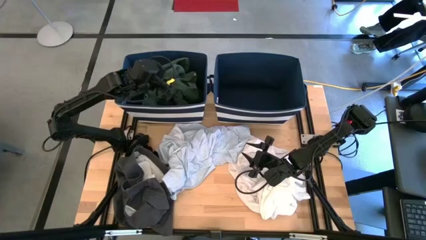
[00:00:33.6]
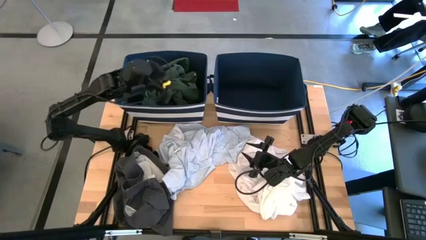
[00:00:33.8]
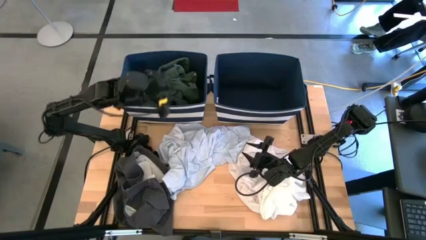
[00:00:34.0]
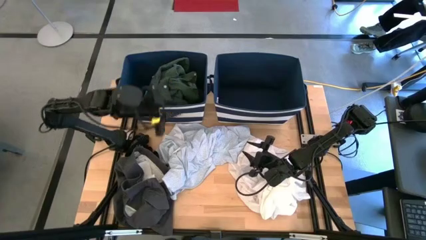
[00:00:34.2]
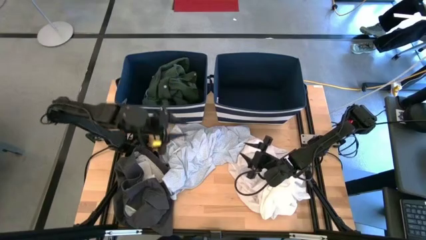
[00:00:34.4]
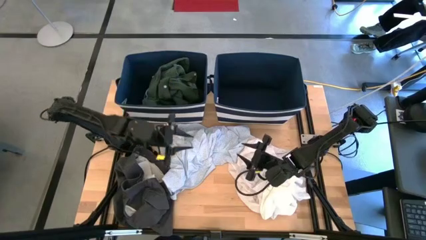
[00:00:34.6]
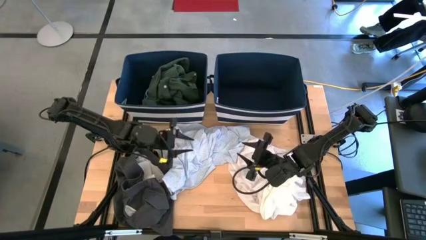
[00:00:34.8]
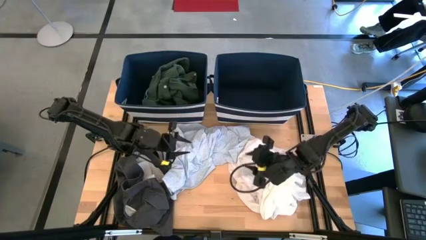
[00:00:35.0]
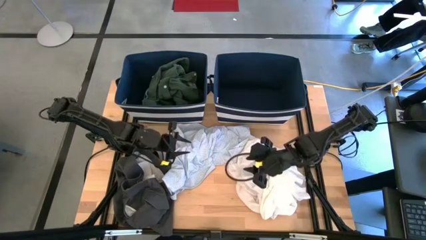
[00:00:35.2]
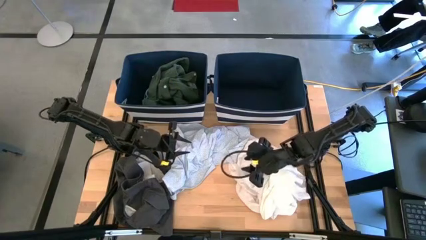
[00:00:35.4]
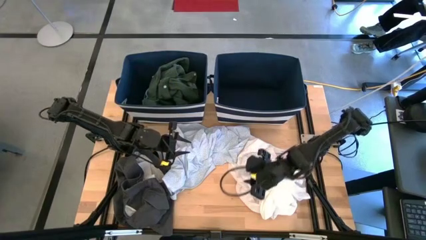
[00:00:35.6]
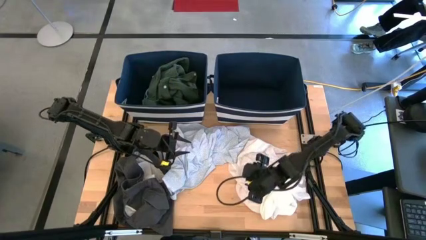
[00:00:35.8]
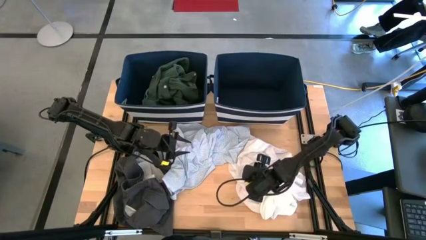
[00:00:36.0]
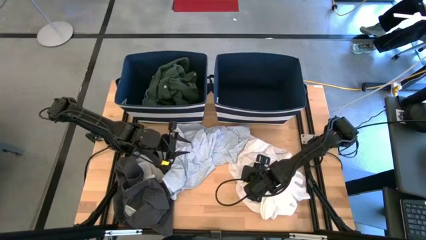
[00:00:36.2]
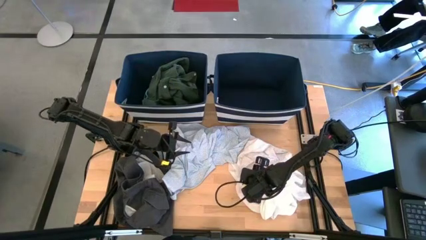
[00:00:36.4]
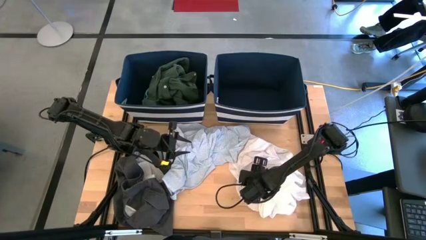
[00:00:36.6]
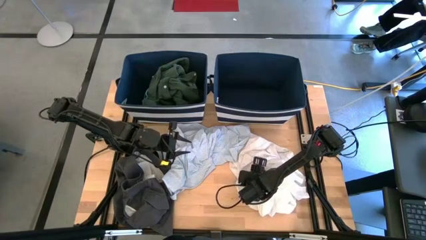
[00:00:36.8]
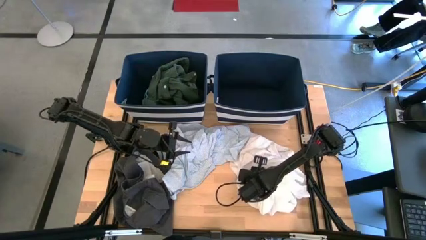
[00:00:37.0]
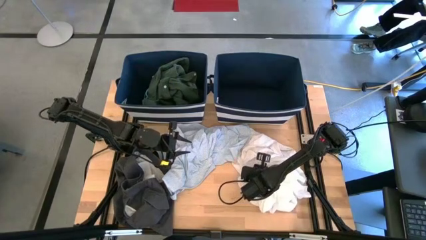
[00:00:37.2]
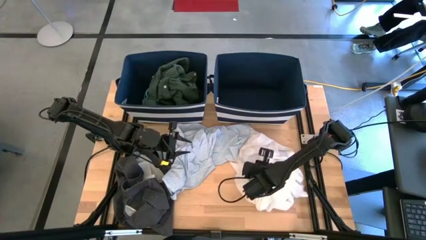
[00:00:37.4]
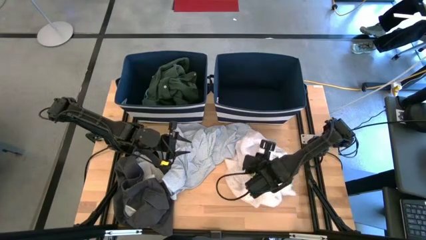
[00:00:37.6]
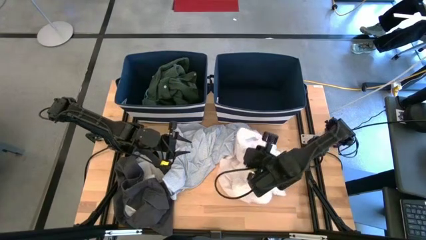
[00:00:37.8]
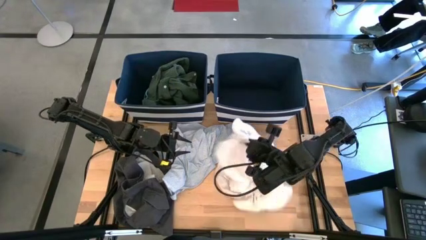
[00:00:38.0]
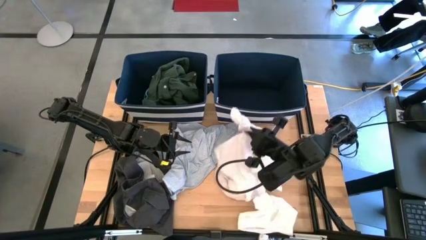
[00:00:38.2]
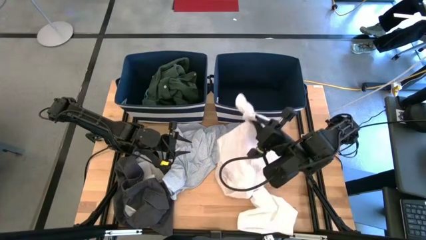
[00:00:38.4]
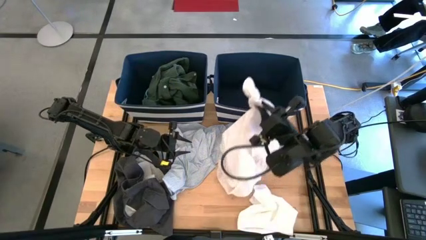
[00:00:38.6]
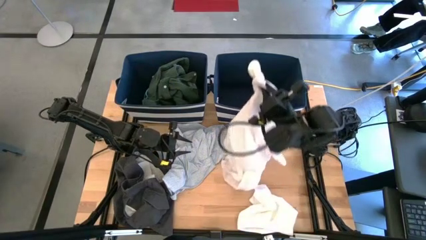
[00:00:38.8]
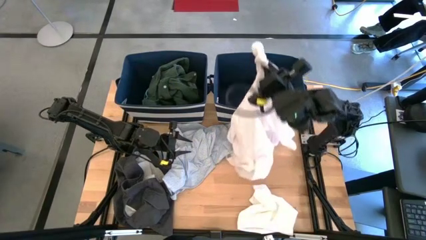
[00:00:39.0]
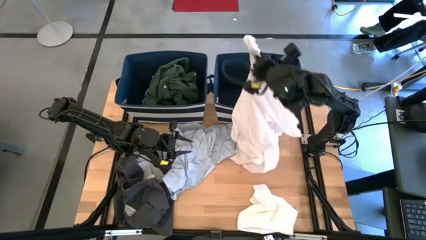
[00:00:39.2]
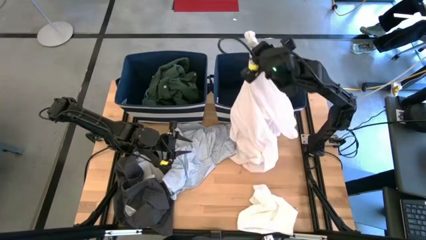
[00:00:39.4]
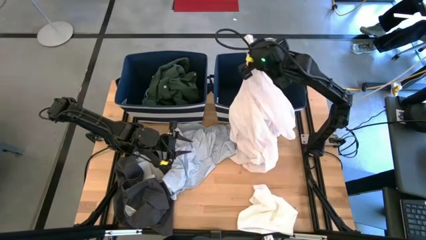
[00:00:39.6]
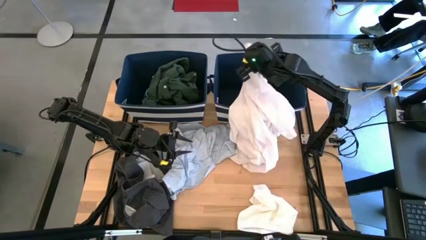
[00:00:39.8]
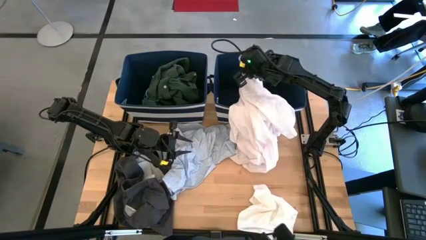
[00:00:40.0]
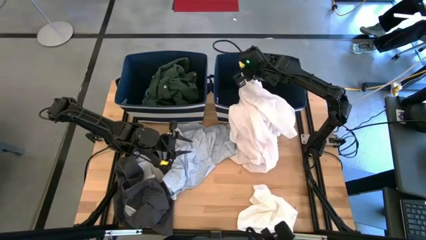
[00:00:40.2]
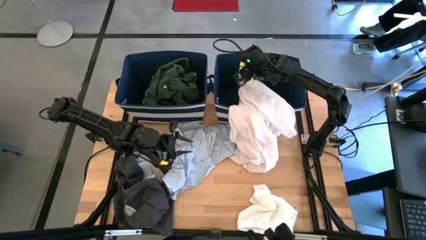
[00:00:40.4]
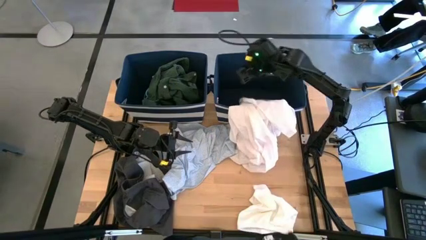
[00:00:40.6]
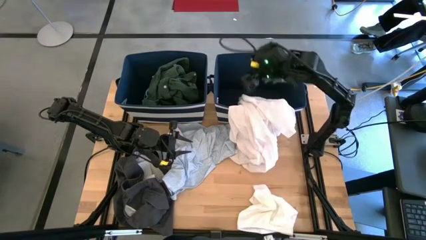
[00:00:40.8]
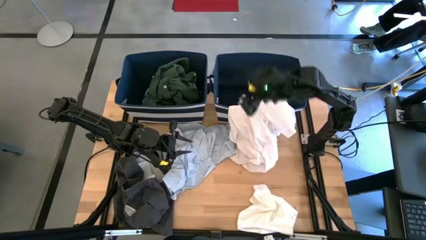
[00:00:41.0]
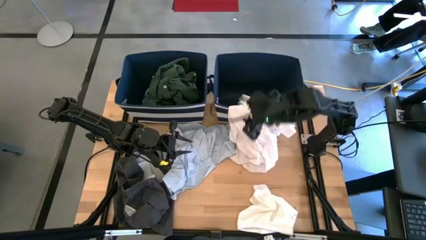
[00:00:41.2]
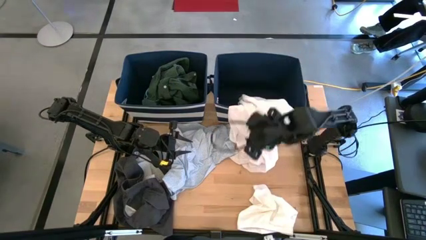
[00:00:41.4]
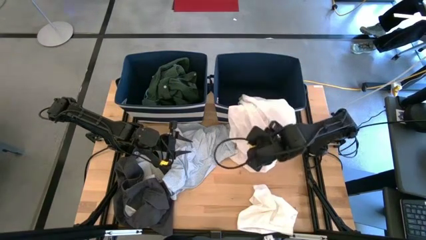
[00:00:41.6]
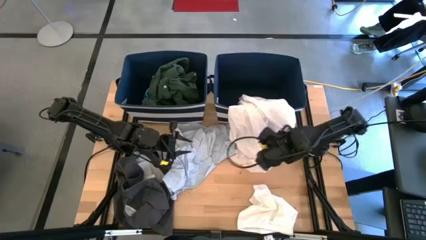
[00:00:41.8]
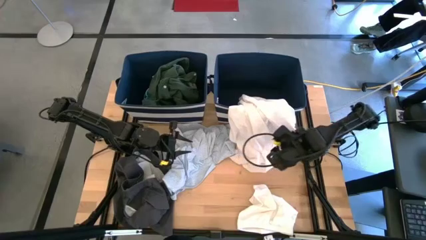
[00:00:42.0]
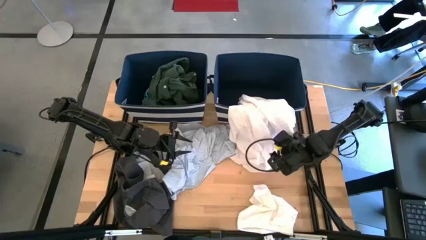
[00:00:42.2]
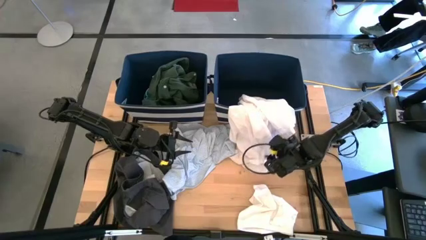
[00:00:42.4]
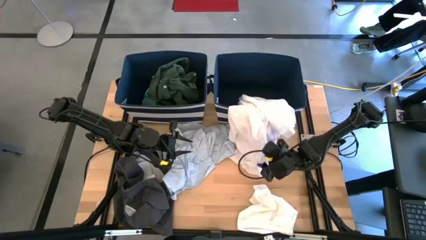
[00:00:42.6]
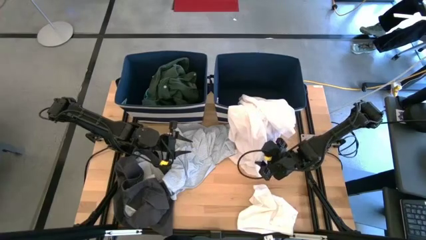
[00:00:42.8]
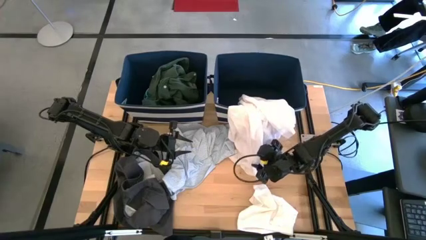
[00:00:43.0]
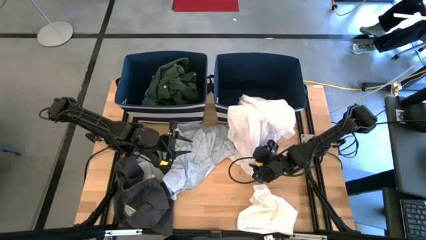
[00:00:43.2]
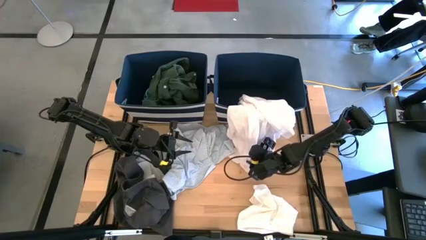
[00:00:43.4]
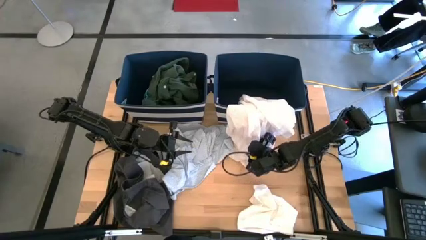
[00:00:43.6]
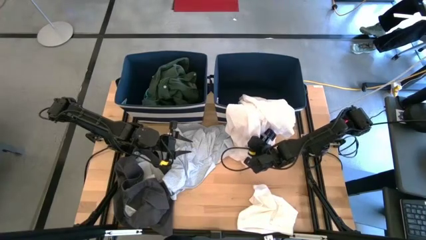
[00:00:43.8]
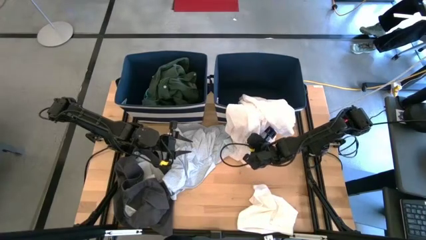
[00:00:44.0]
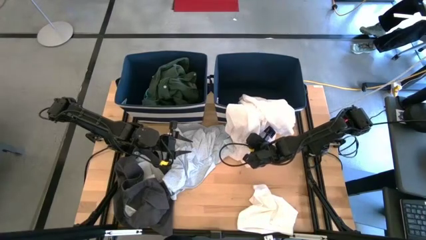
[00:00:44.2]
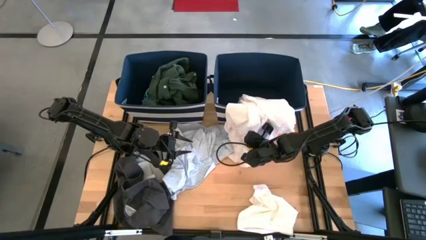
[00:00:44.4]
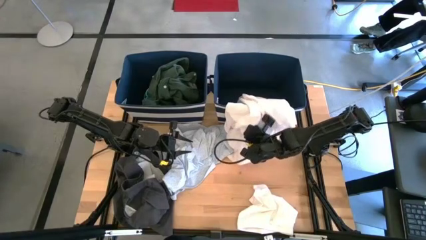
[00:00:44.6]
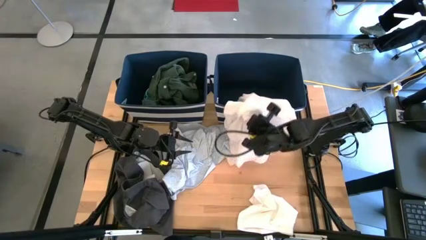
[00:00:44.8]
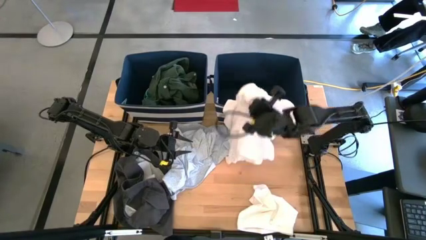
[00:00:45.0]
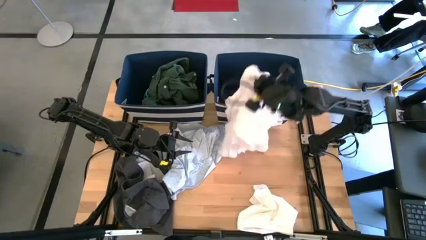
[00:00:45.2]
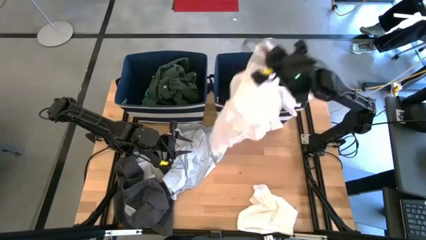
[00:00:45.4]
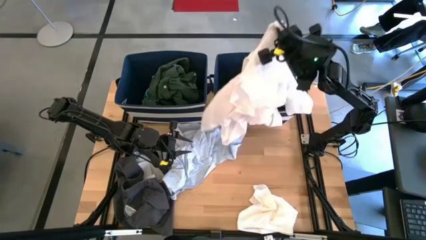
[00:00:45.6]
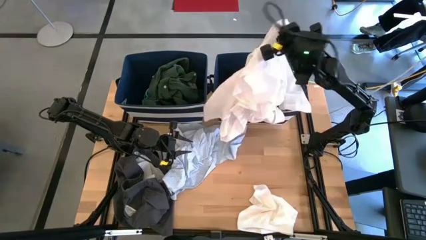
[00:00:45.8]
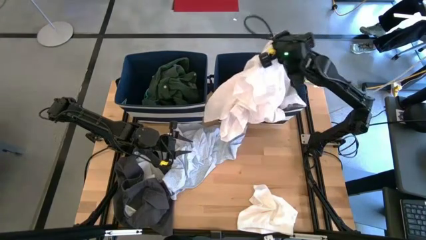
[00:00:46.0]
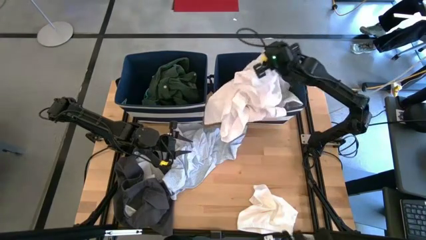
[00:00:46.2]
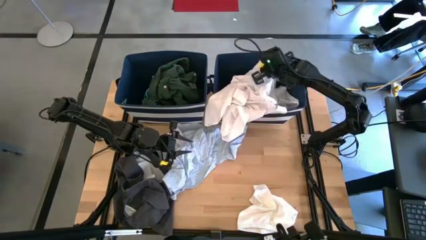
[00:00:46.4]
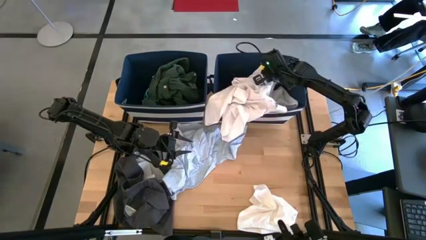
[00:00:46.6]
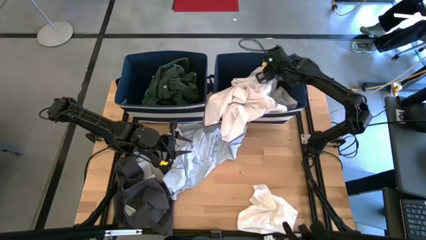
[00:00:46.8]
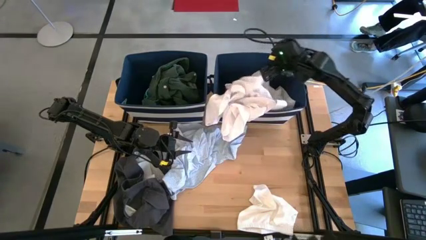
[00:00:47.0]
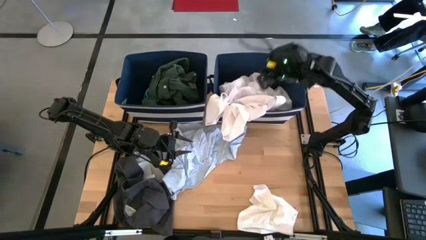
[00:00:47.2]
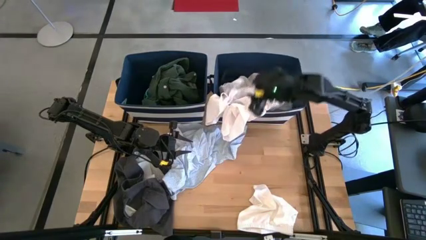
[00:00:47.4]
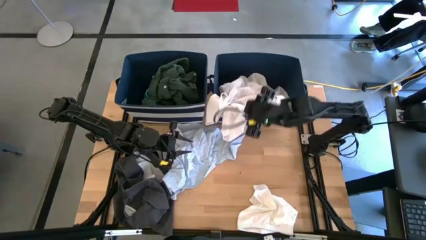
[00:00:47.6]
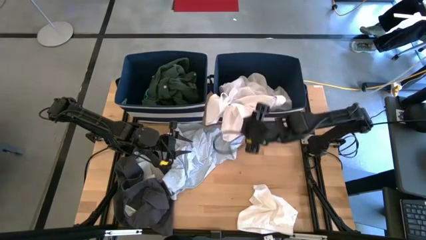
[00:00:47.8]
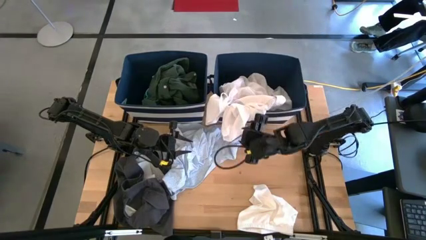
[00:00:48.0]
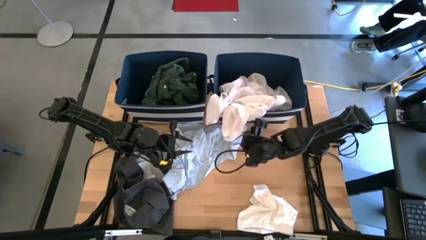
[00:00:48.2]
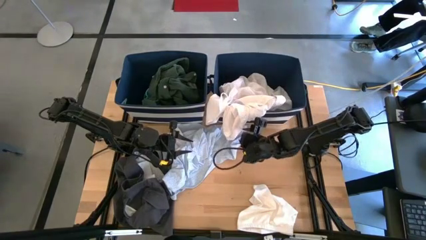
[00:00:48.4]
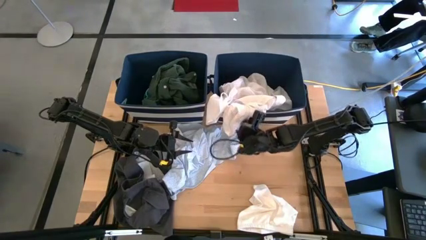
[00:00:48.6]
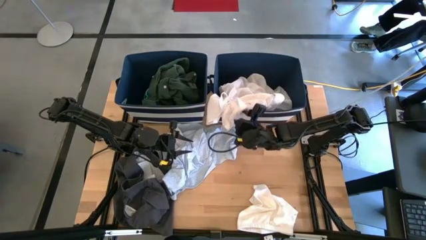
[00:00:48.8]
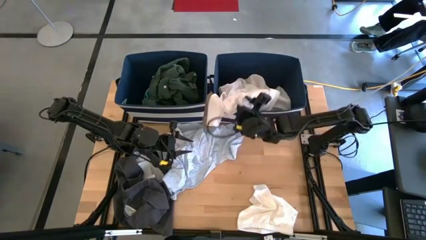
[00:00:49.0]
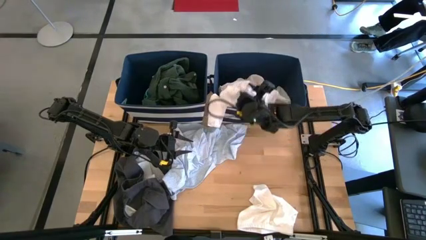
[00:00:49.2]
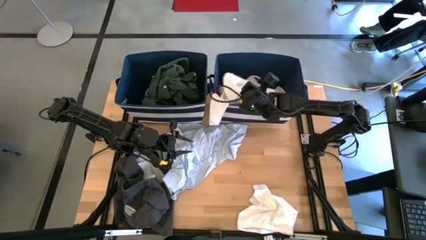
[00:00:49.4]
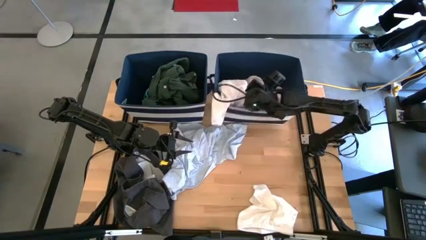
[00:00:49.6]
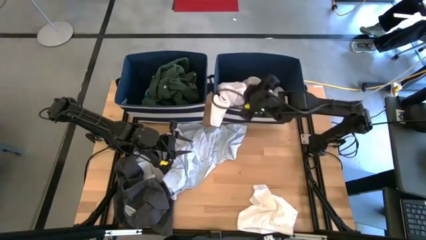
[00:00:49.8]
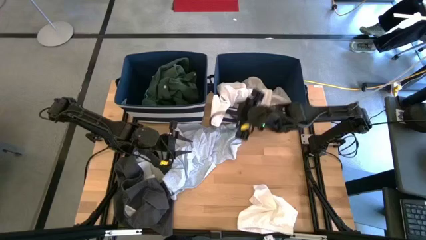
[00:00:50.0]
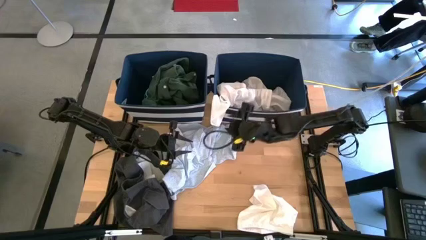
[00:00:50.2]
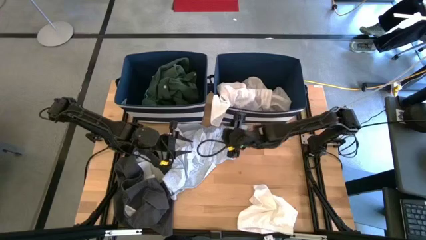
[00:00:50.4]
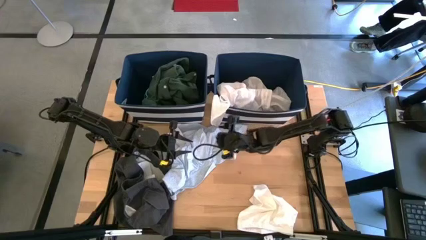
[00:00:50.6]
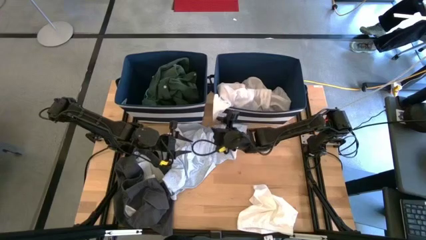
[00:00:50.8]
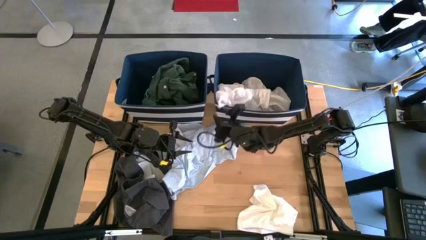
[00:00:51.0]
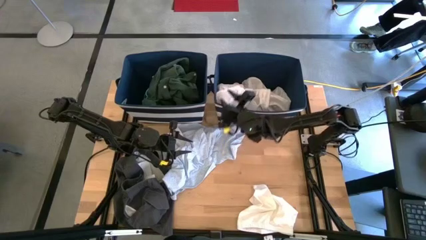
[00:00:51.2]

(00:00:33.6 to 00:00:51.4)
Task: Sort clothes
Put the white dress into the right laundry bin
